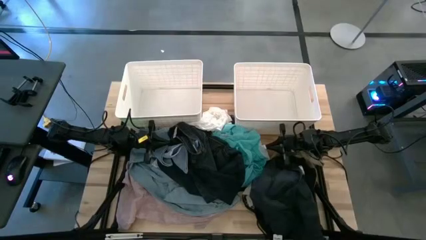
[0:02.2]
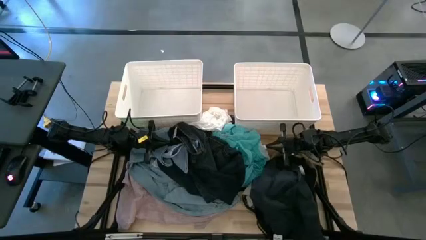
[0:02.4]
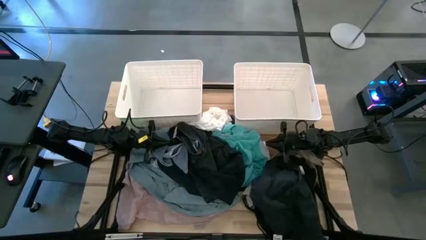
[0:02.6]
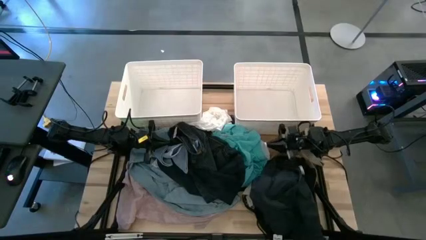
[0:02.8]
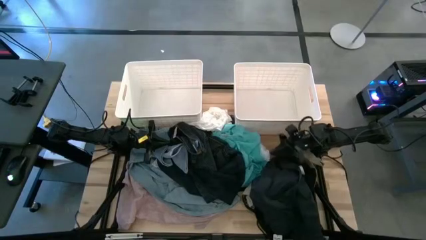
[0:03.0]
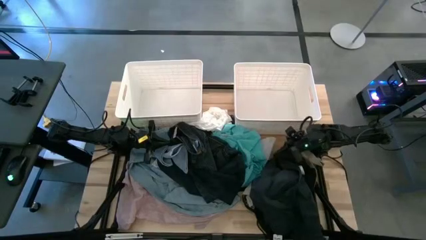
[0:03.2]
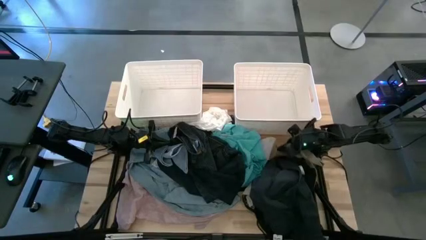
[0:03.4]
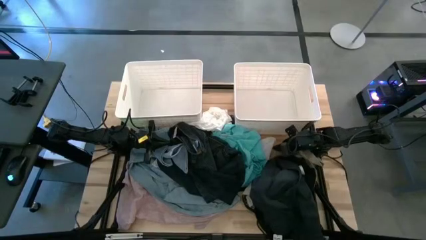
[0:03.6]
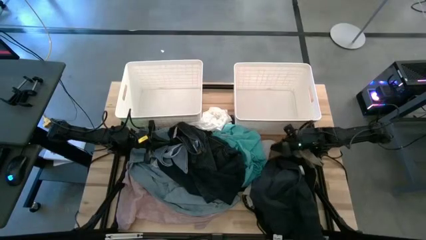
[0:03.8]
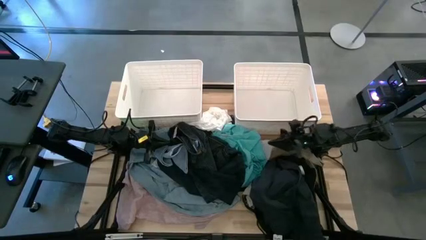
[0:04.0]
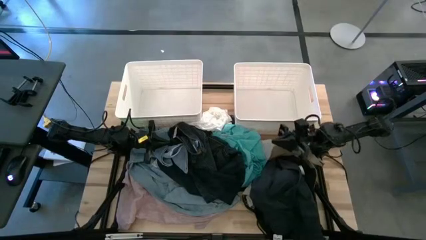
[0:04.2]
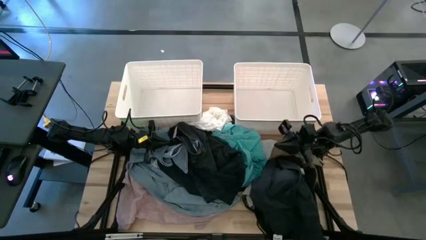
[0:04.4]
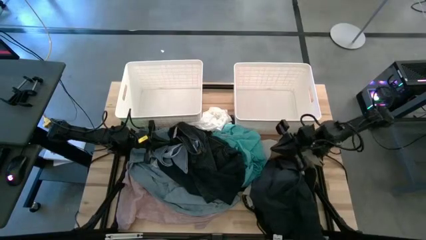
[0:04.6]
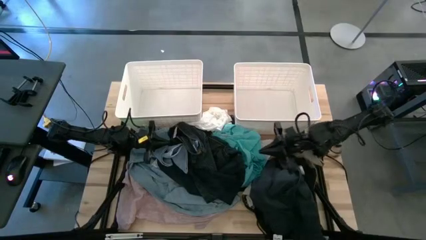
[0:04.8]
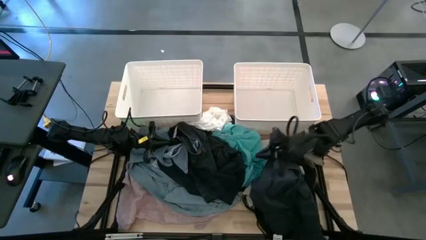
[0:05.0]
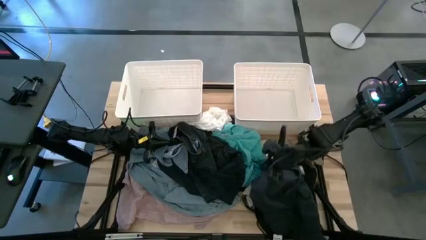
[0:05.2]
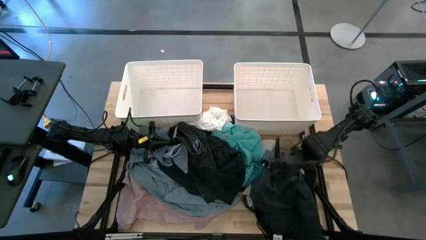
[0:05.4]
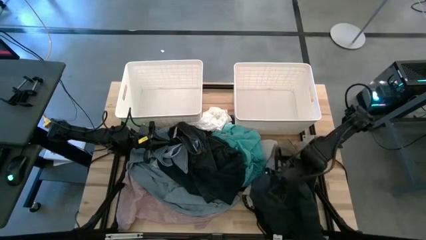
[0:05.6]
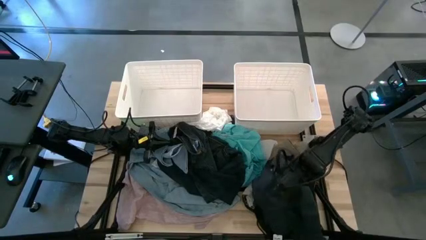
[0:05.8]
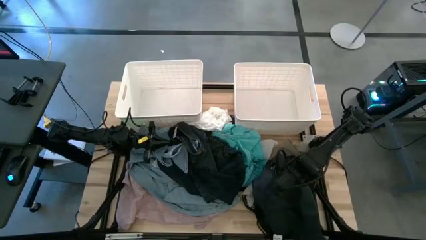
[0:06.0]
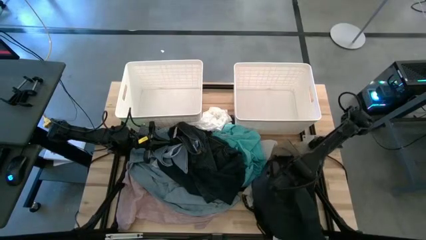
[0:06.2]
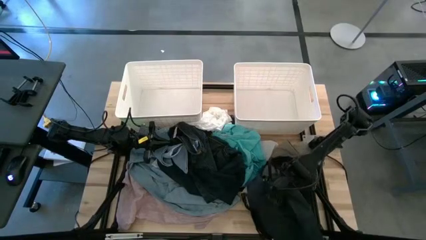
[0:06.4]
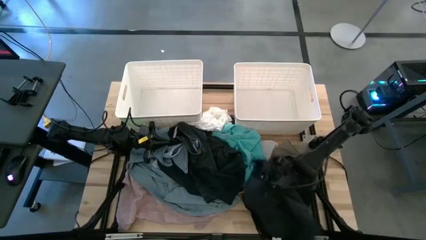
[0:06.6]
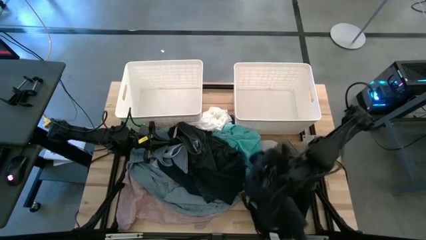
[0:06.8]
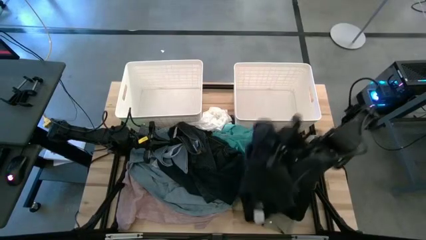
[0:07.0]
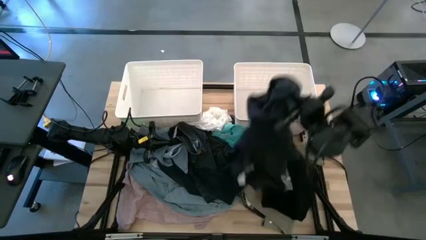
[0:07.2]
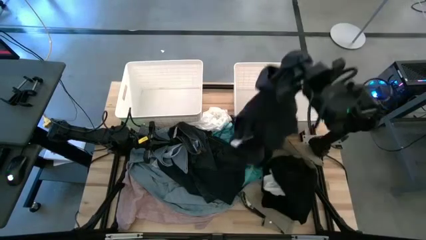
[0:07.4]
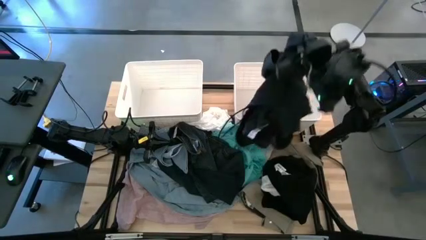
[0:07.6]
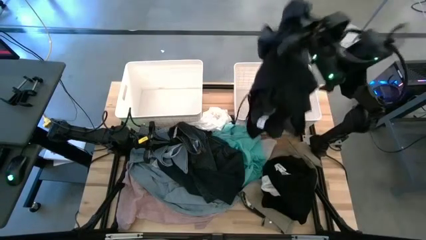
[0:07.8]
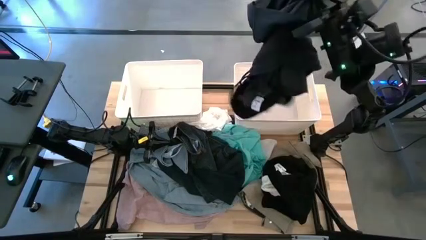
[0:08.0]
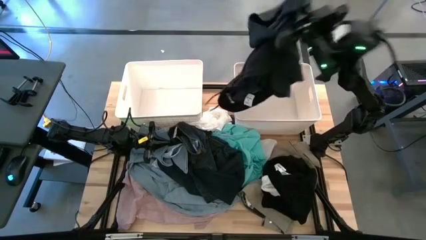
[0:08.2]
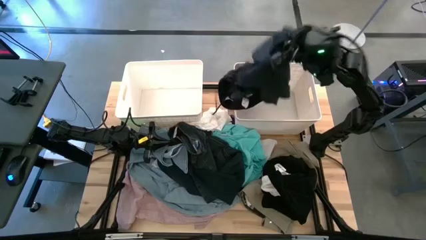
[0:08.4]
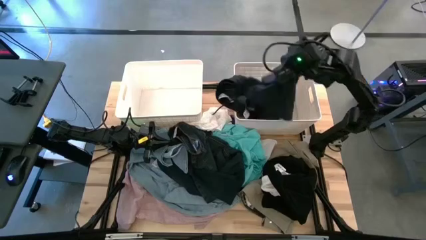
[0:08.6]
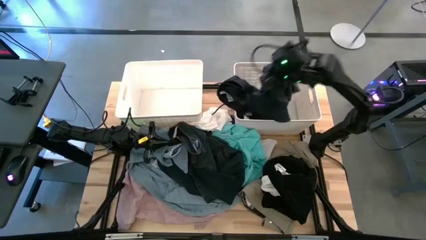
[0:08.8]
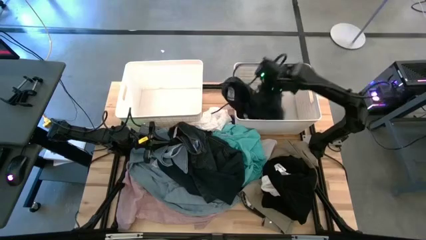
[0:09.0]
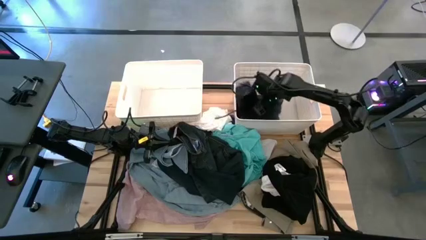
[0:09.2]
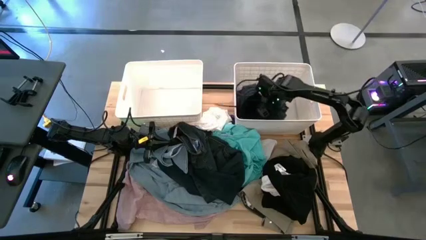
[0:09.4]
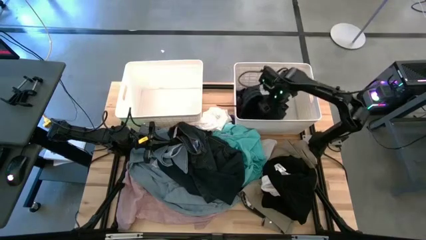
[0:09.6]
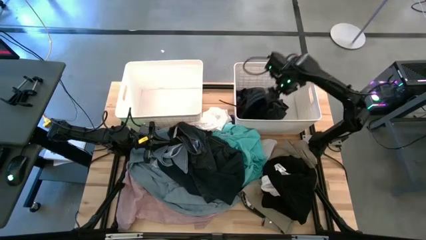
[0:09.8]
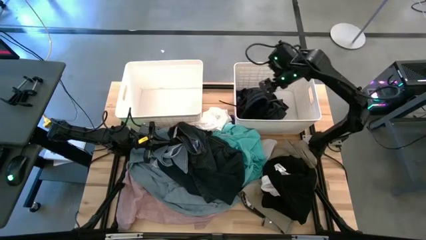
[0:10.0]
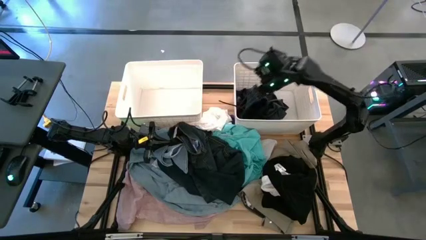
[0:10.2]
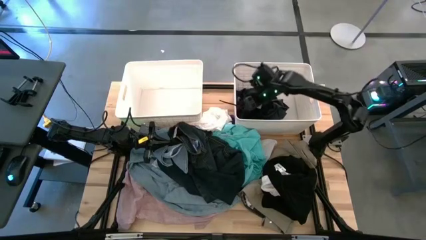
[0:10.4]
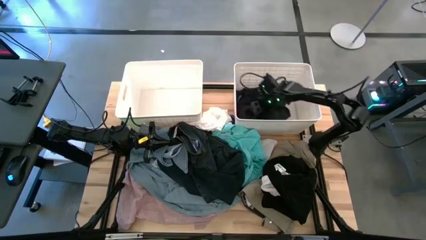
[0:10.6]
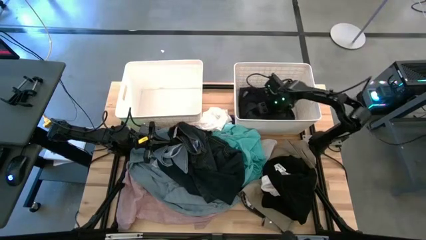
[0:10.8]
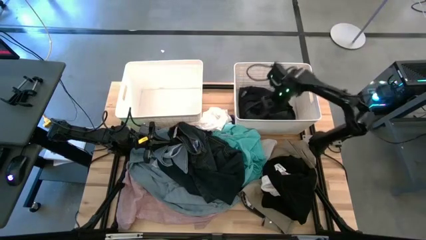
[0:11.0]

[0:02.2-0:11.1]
Task: Sort clothes
Put the black pants into the right white bin

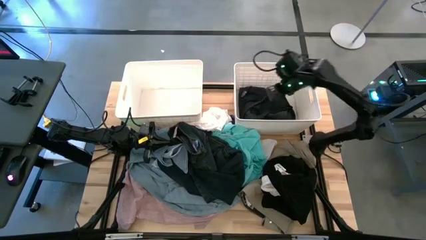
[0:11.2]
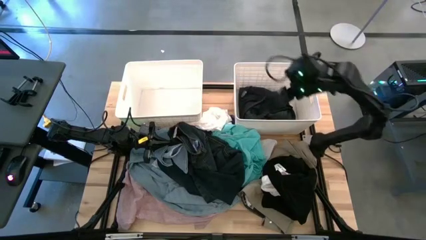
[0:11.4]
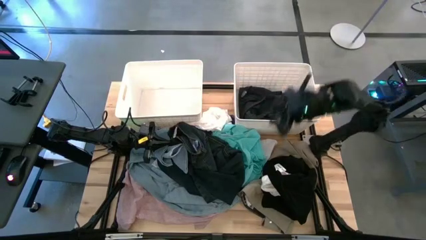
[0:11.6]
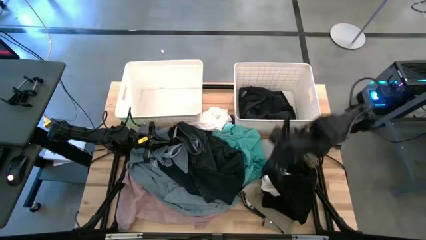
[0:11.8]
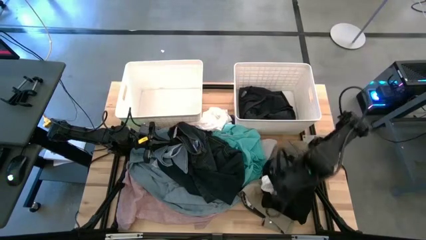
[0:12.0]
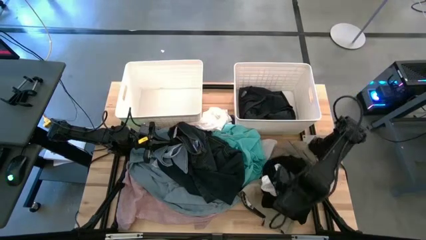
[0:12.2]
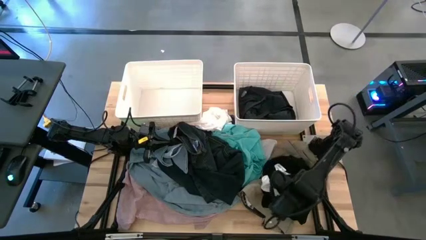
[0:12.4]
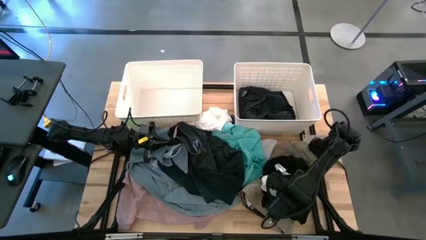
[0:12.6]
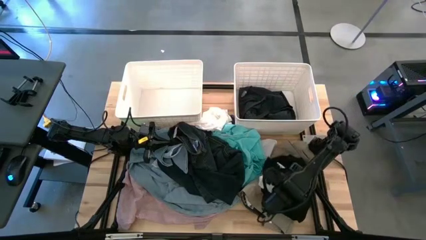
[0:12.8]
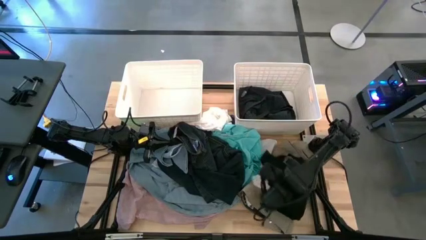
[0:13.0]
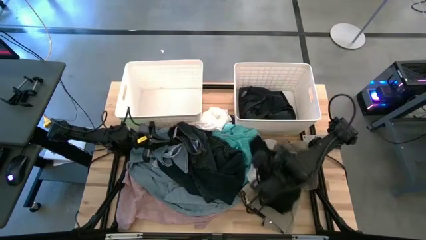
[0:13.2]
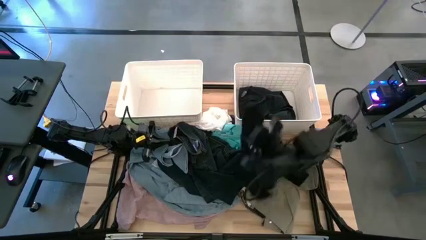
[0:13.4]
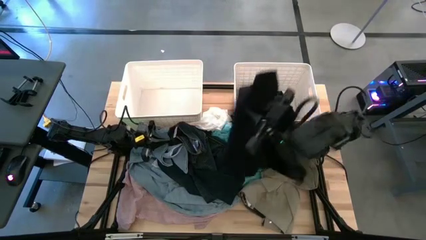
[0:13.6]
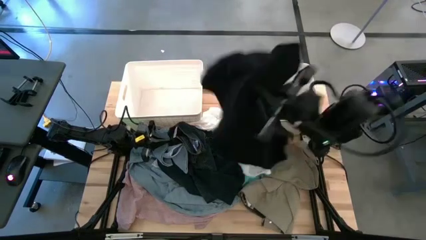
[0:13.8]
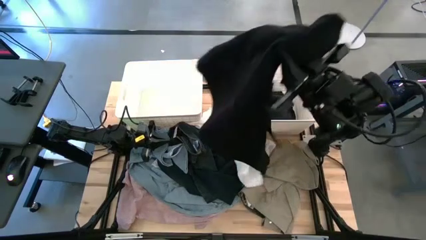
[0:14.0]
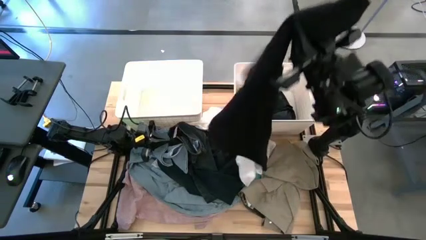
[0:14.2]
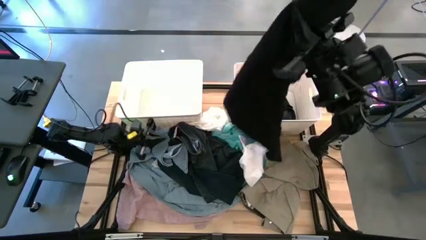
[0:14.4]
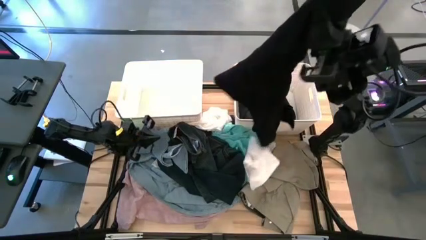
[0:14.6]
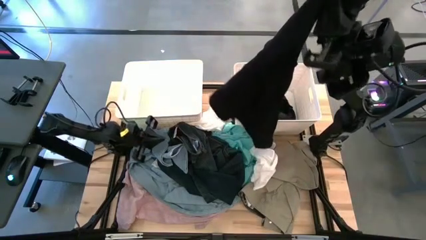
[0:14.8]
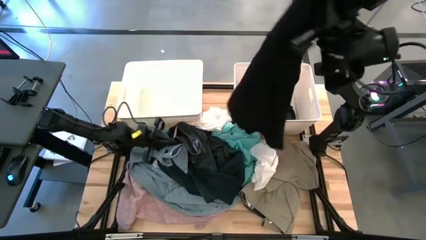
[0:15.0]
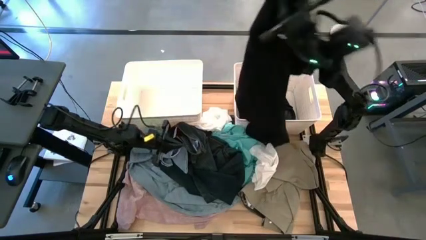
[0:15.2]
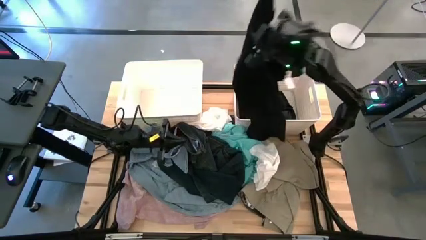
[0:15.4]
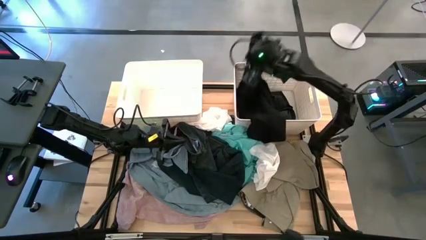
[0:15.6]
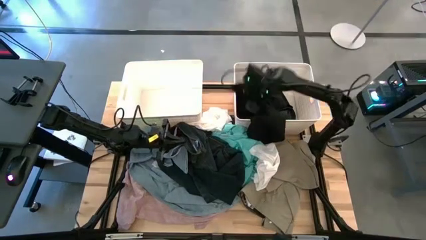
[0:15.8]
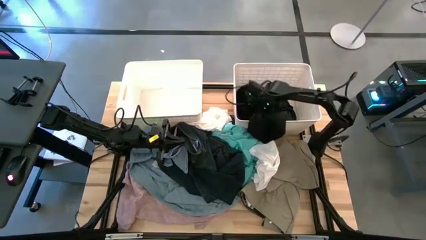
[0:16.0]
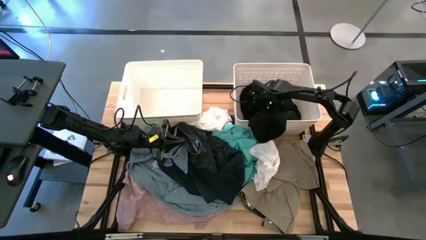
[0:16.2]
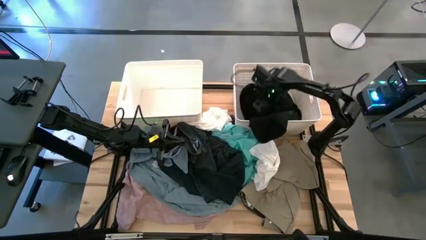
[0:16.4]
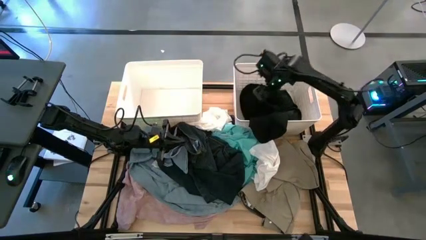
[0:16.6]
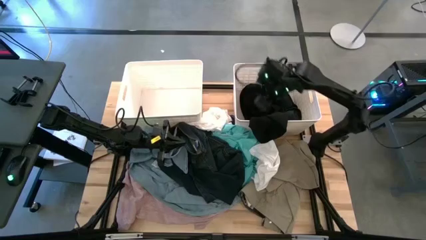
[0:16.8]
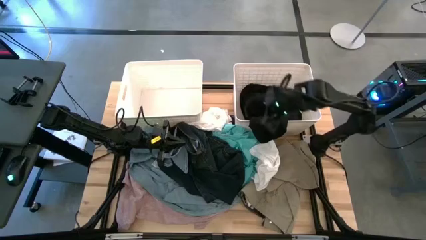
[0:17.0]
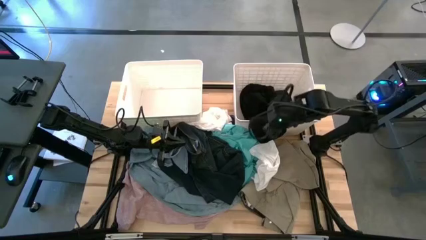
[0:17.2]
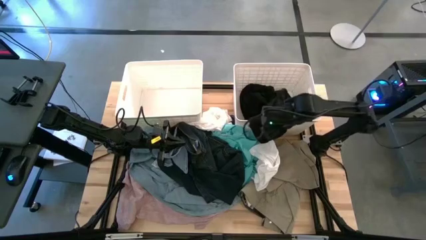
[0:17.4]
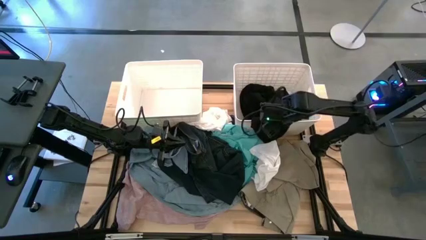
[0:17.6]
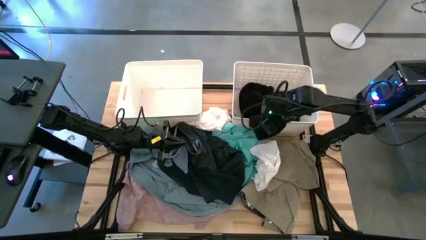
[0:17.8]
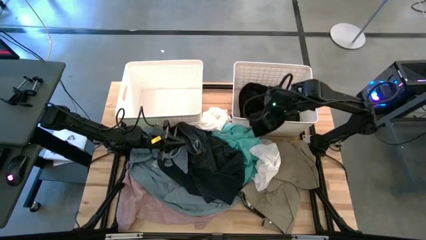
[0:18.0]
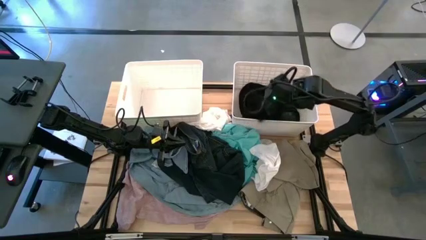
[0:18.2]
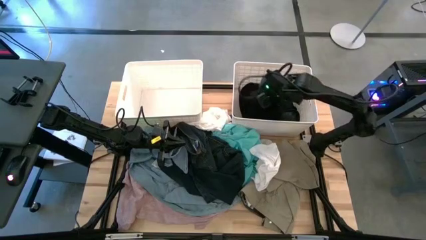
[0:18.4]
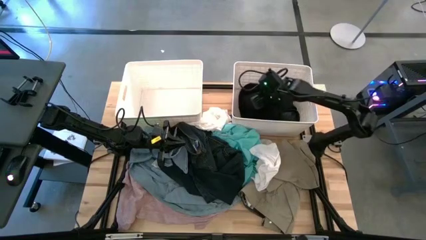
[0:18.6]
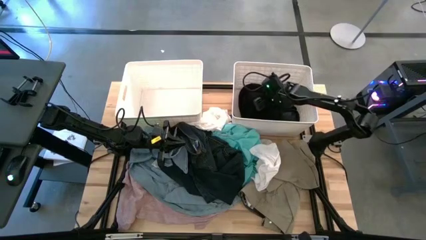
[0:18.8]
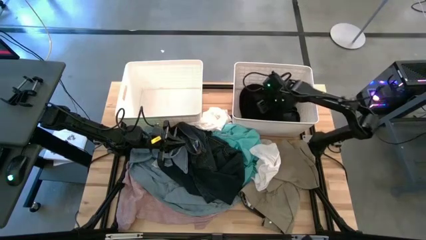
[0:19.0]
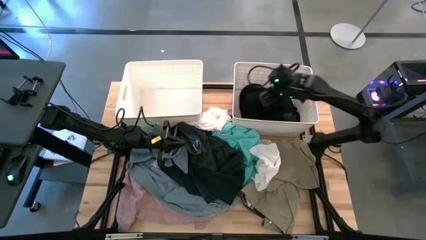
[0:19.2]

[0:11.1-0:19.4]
Put the black shirt into the right white bin
